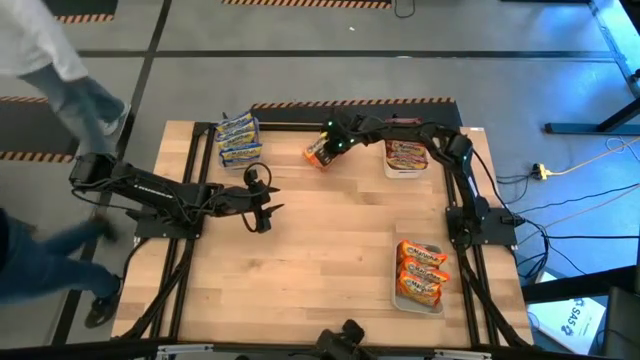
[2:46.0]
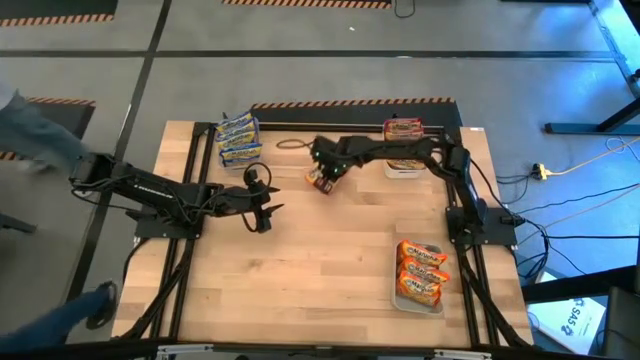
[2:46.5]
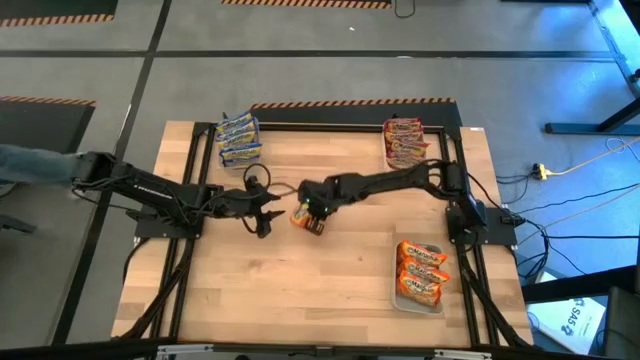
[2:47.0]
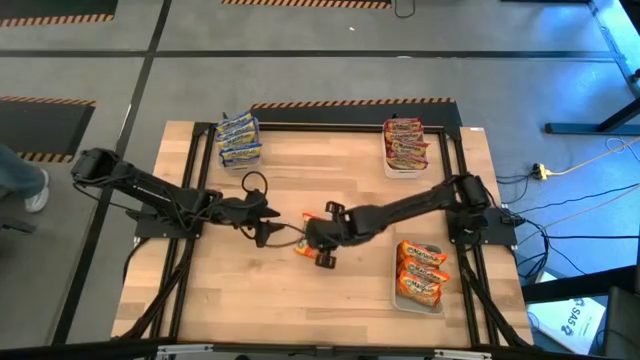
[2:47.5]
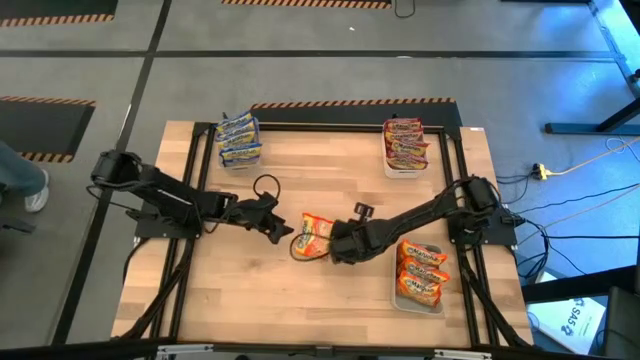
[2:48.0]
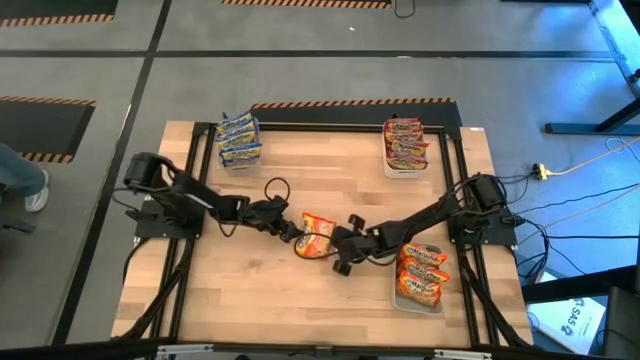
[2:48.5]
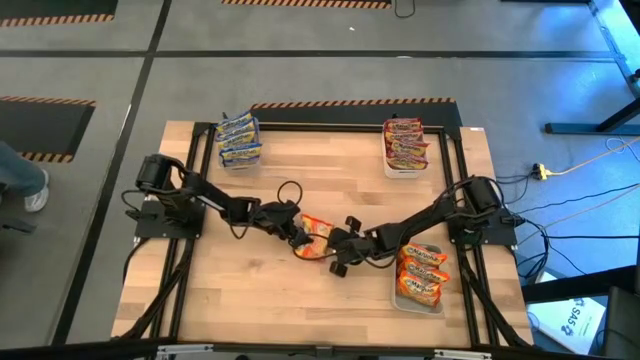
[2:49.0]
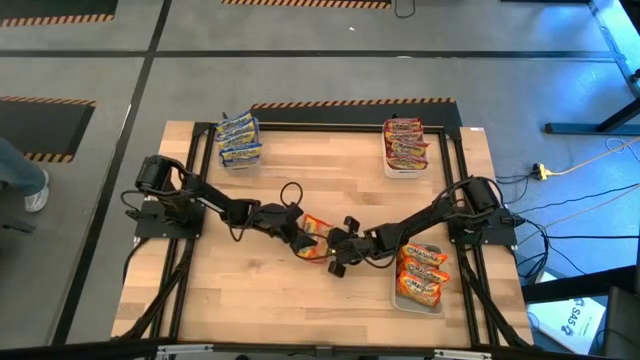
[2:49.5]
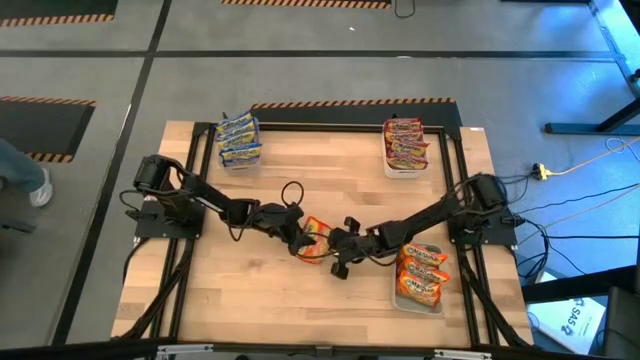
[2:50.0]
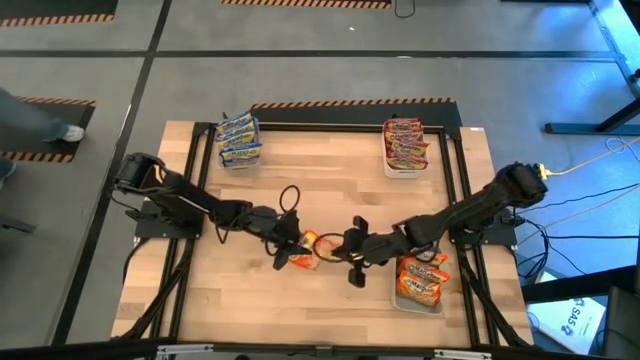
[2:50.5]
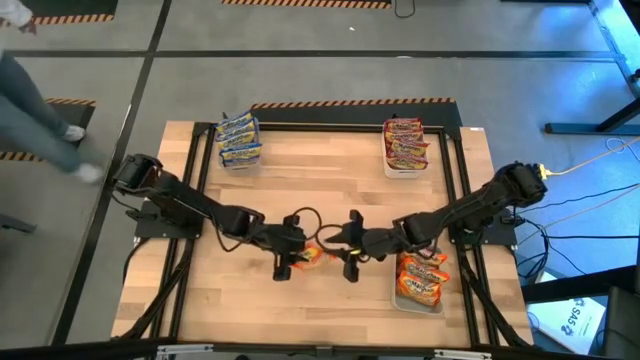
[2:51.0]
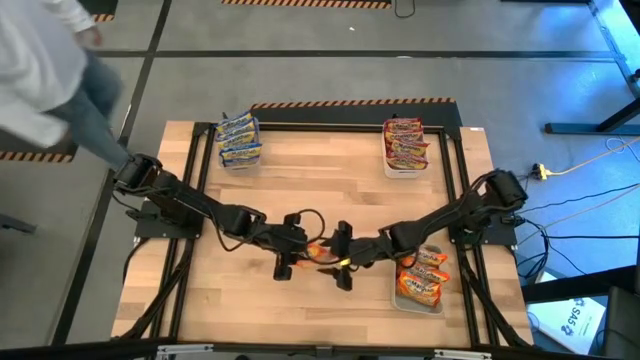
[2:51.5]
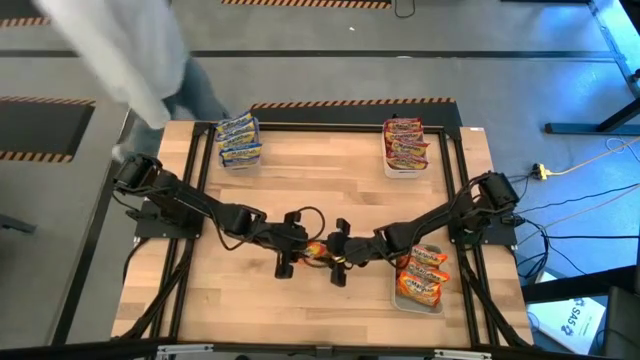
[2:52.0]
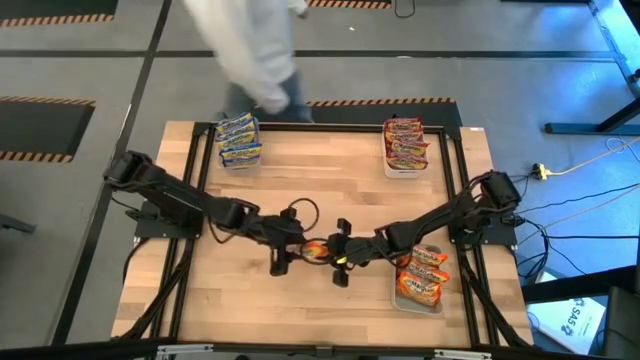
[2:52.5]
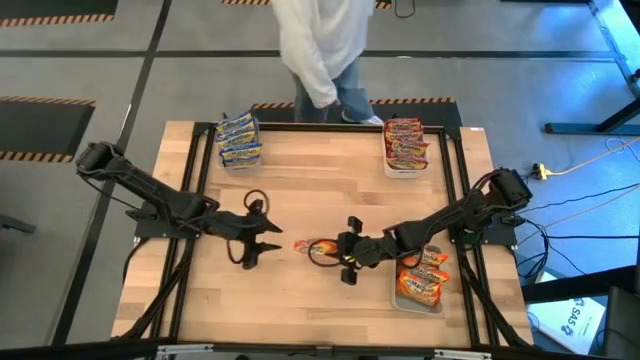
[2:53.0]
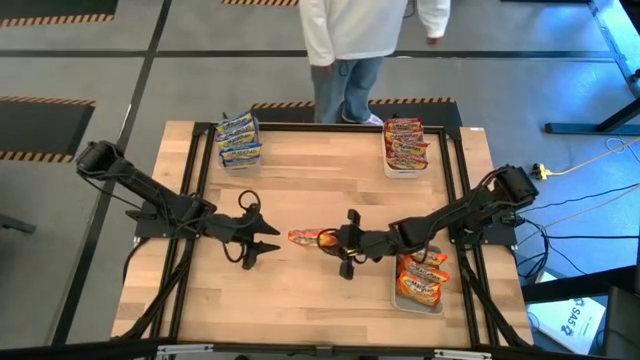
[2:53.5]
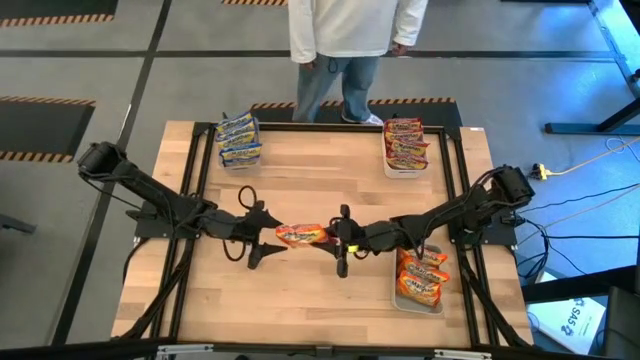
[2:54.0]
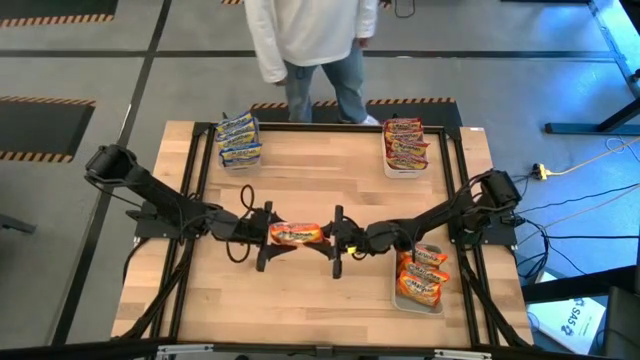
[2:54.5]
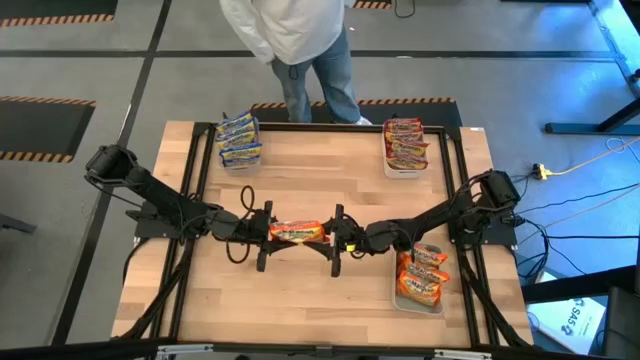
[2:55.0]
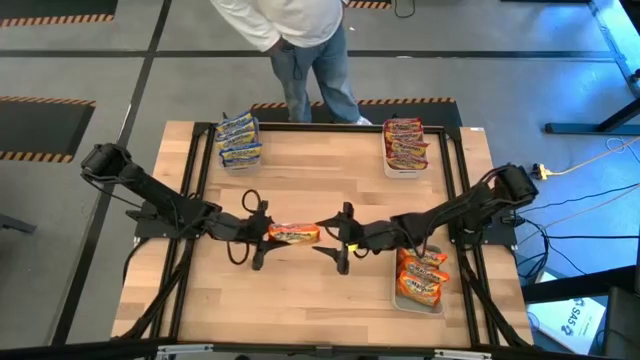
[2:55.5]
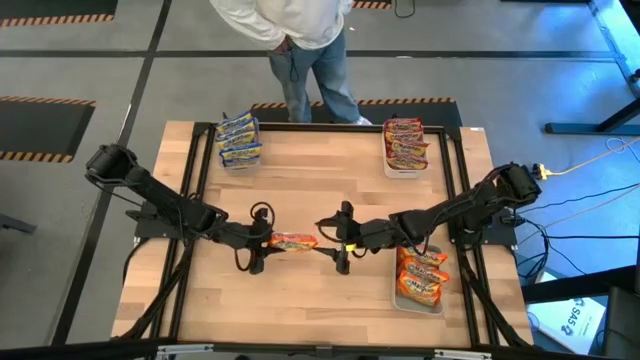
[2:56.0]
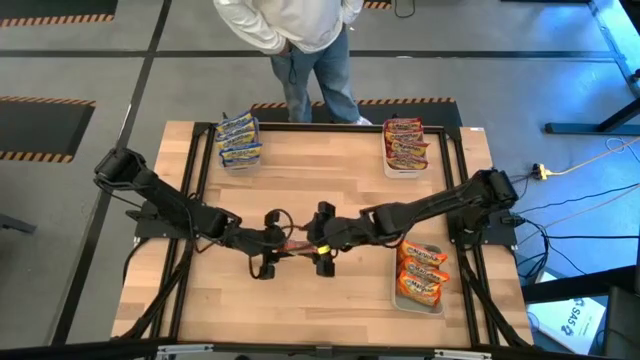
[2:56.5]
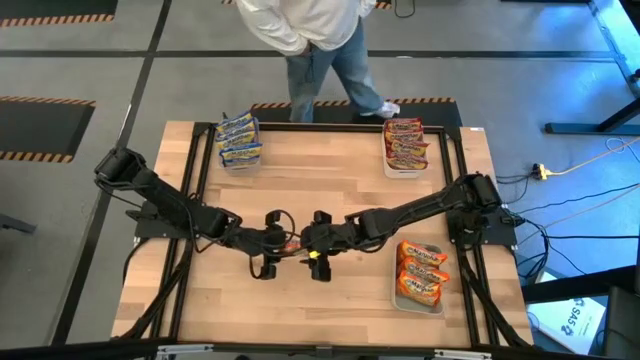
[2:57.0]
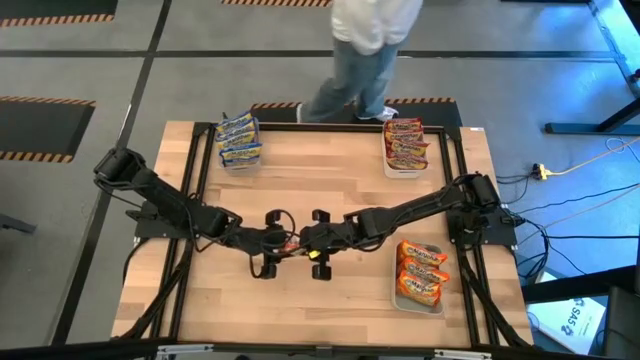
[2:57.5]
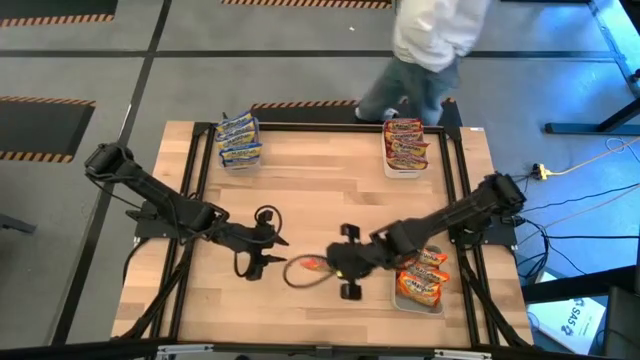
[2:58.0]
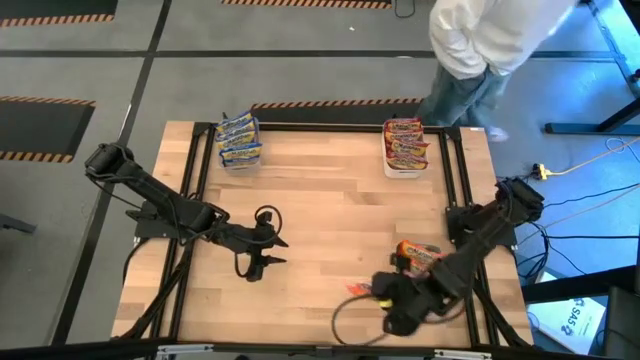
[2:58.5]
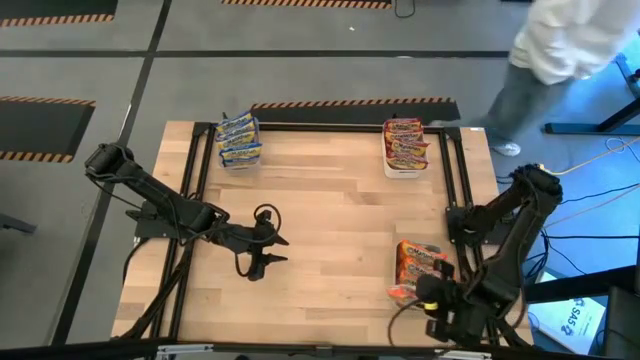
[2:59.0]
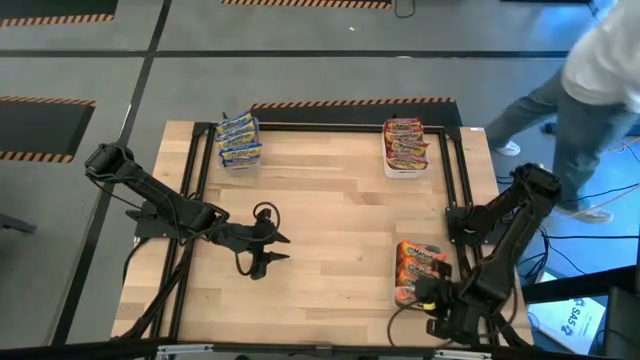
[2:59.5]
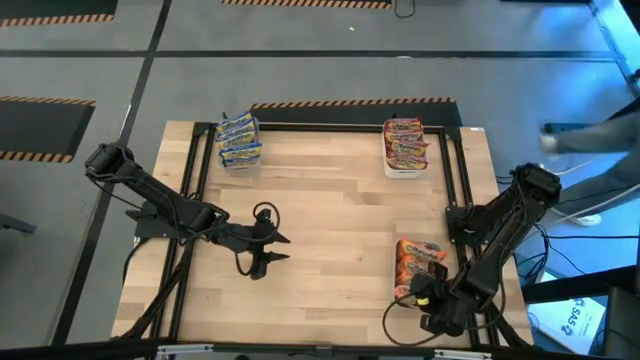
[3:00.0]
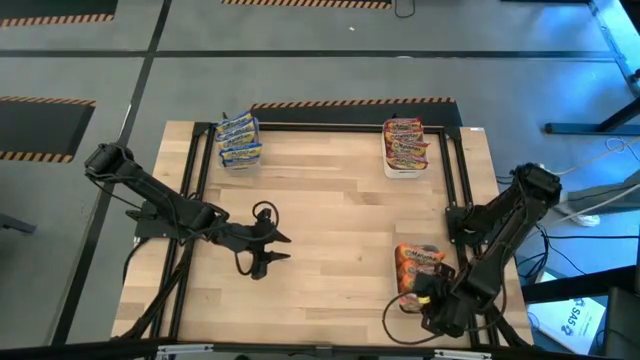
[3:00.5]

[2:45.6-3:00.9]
Task: Sort Maruchan noodles
Put the orange noodle pack into the gray bin

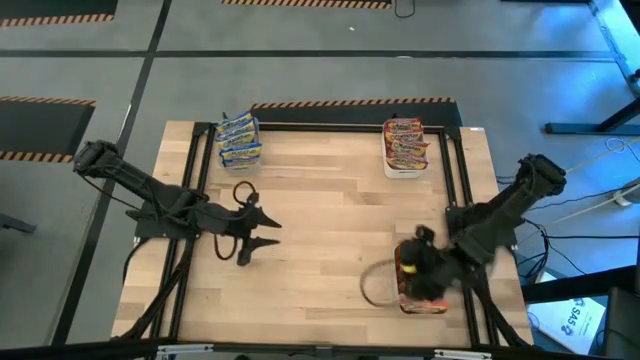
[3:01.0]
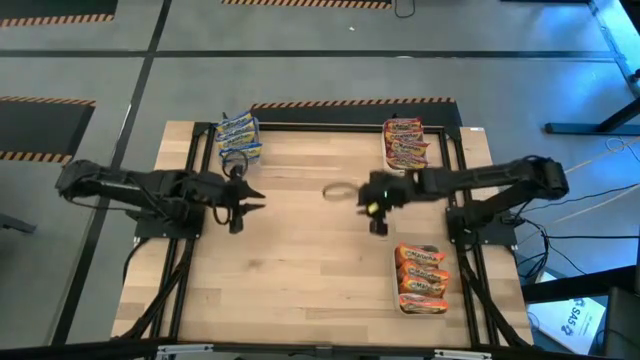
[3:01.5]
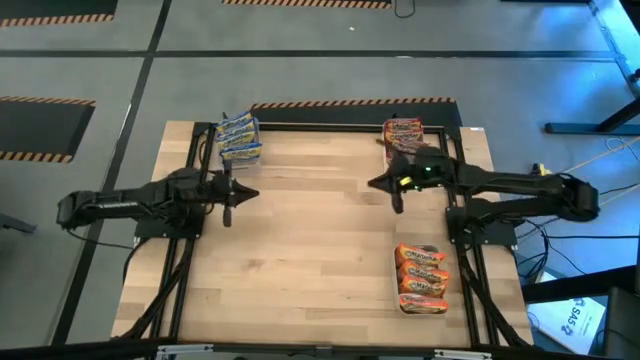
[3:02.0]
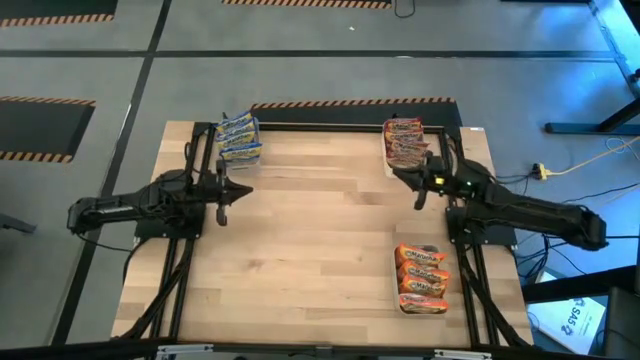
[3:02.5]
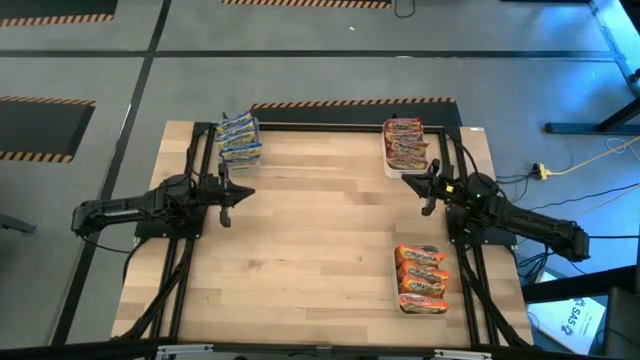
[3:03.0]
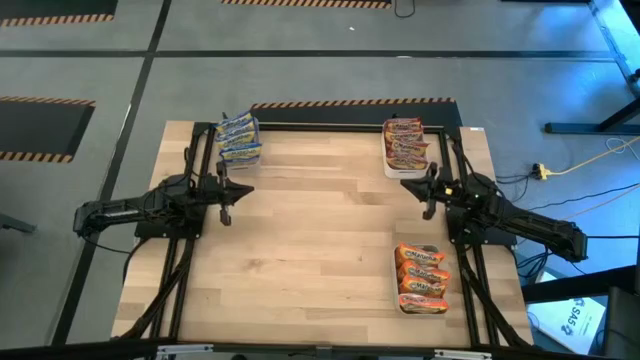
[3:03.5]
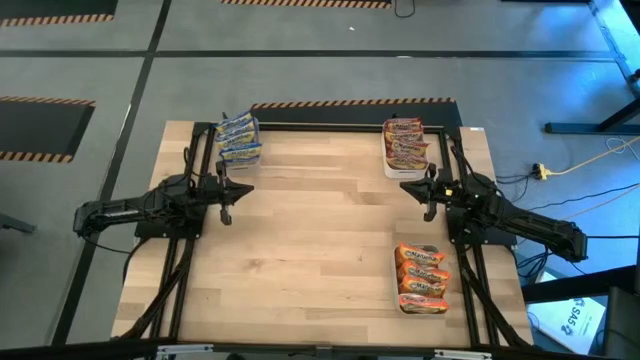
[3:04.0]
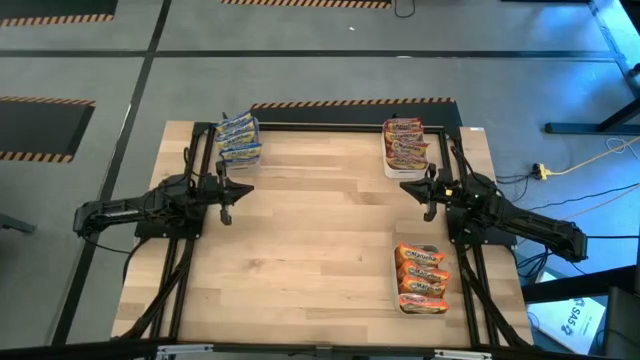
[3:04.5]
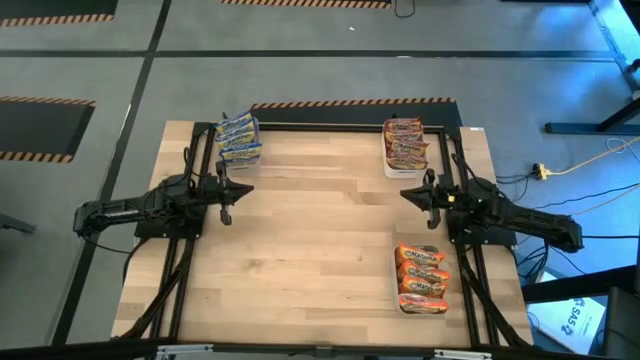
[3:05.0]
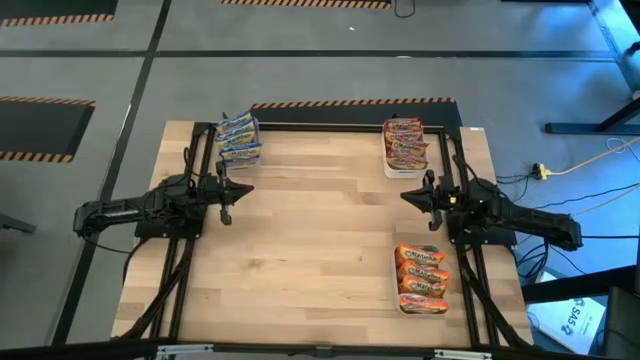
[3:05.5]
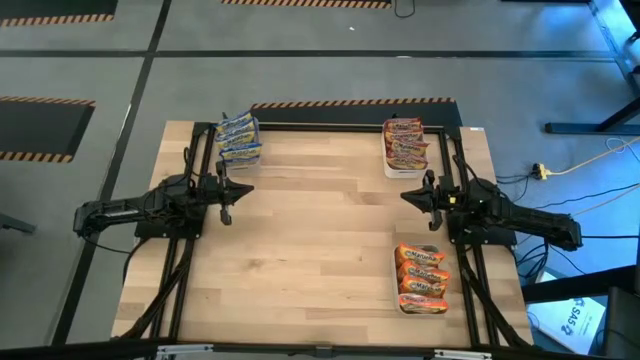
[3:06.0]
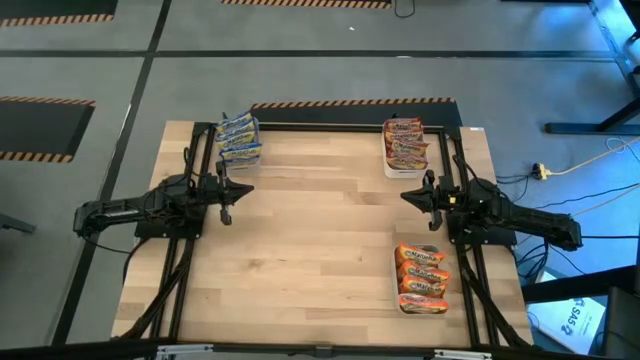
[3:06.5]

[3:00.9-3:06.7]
Return to Home Position
